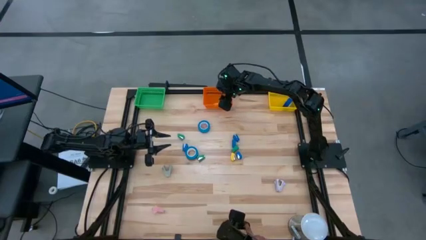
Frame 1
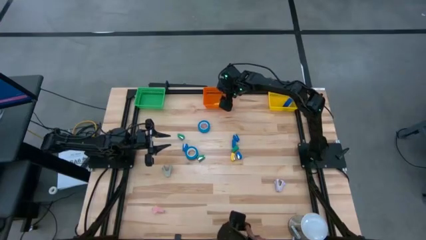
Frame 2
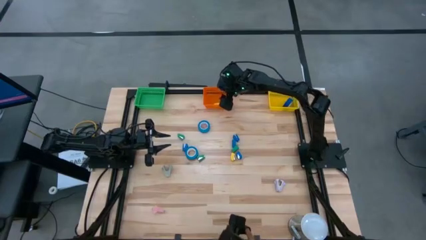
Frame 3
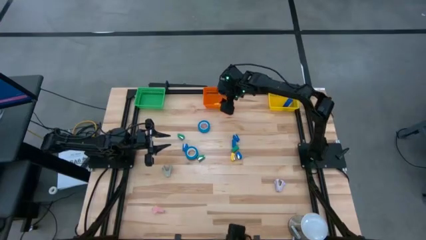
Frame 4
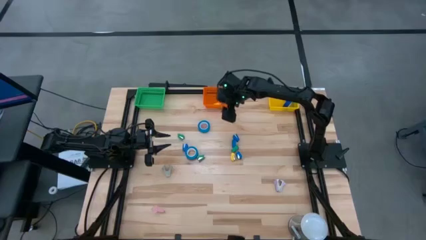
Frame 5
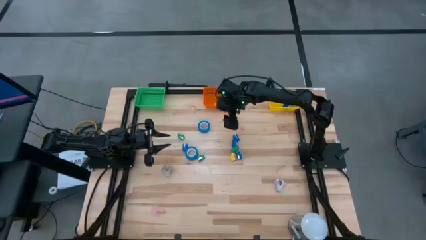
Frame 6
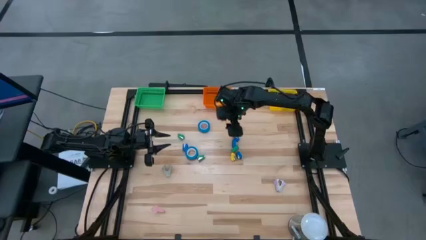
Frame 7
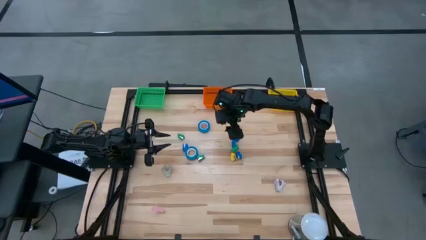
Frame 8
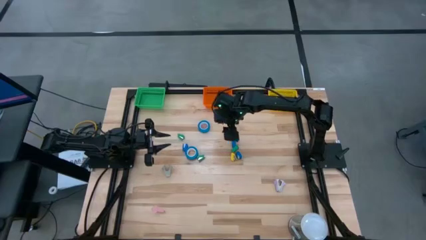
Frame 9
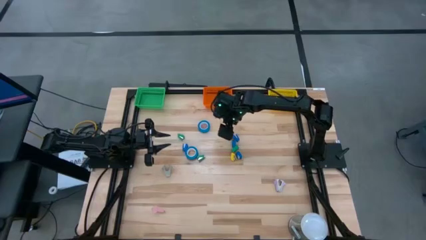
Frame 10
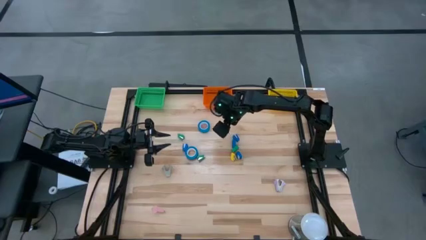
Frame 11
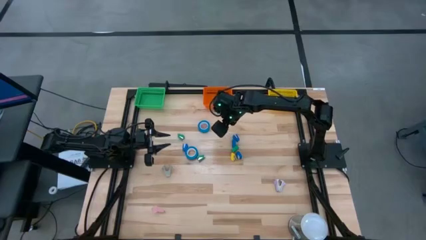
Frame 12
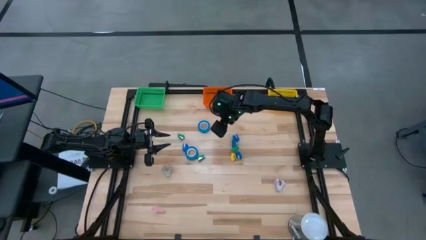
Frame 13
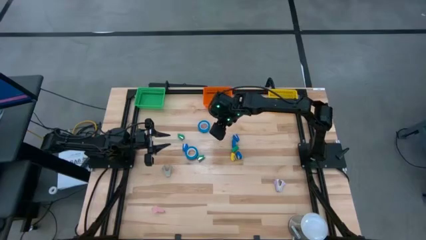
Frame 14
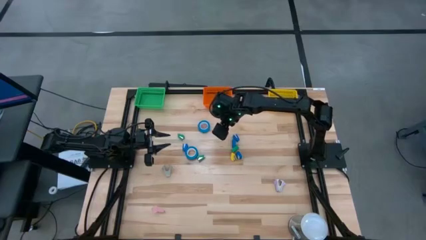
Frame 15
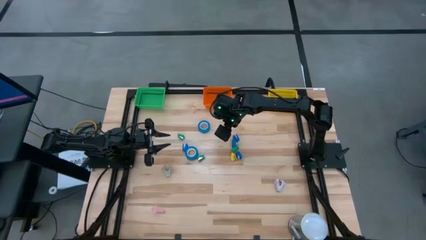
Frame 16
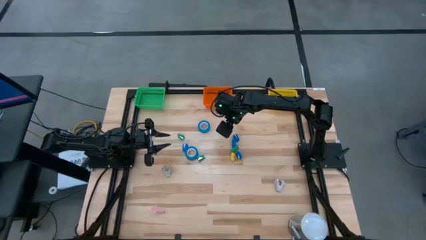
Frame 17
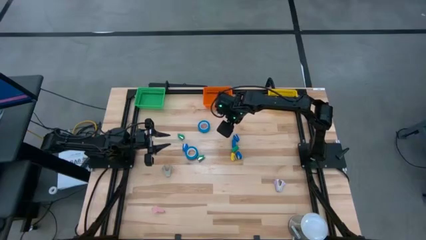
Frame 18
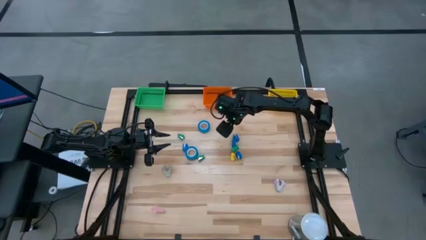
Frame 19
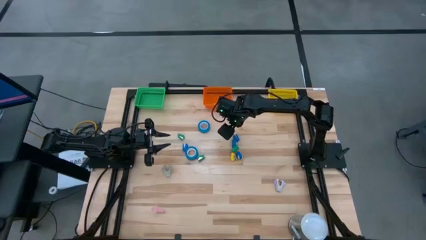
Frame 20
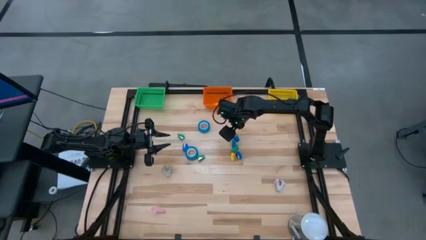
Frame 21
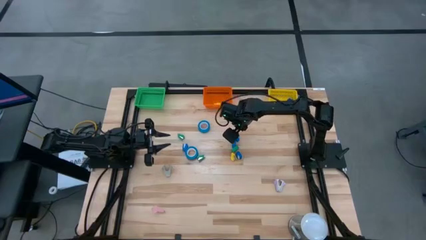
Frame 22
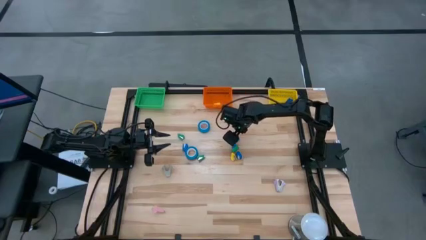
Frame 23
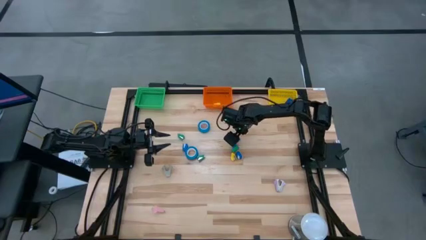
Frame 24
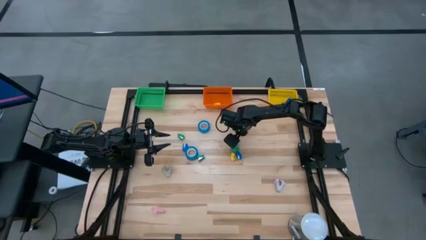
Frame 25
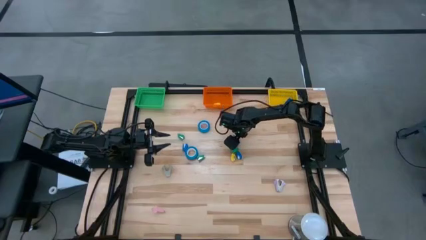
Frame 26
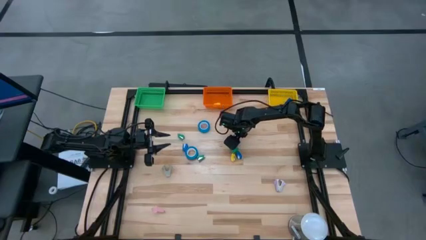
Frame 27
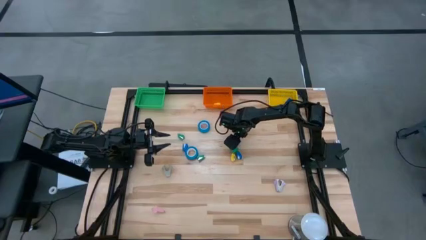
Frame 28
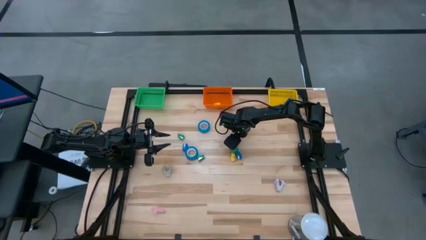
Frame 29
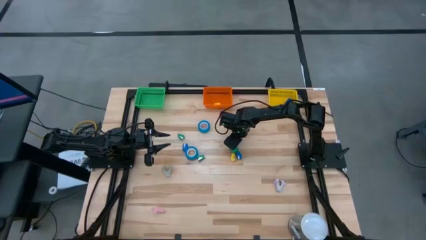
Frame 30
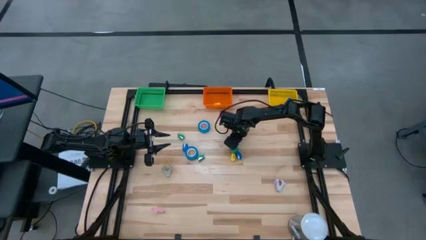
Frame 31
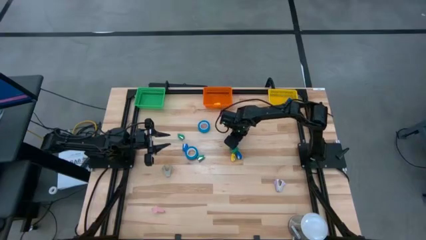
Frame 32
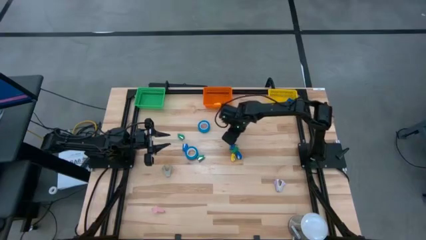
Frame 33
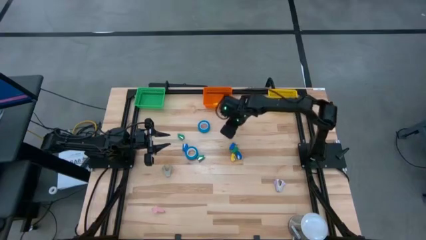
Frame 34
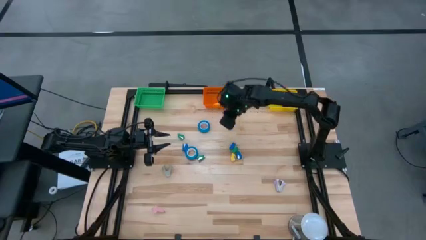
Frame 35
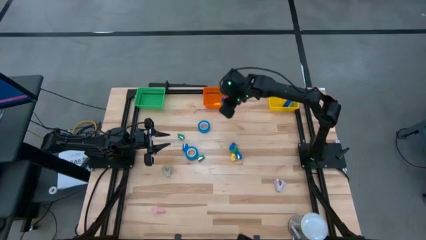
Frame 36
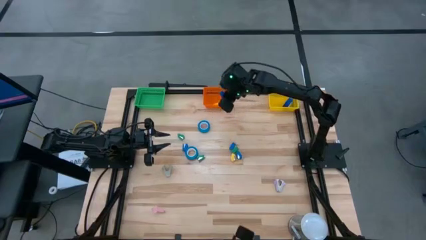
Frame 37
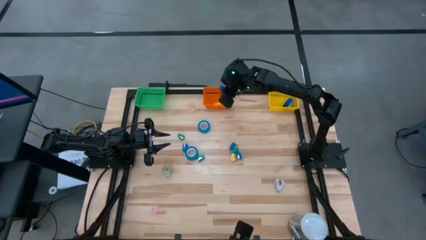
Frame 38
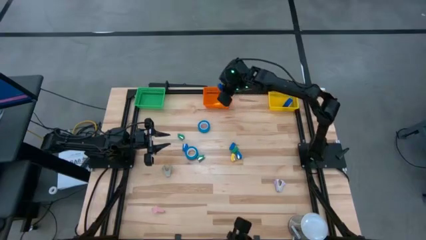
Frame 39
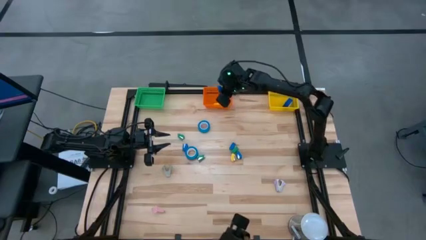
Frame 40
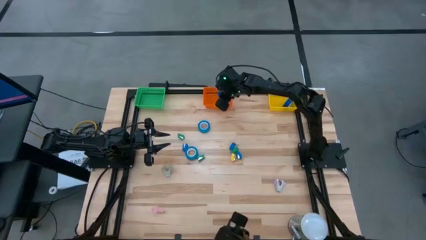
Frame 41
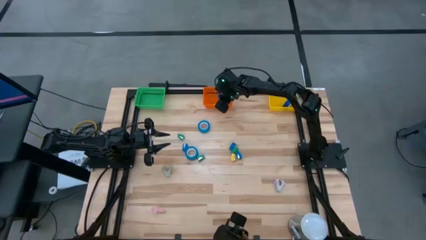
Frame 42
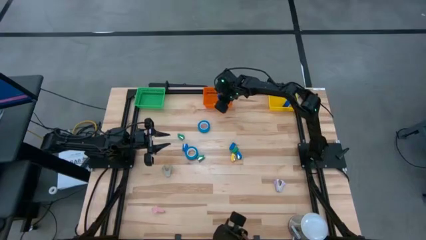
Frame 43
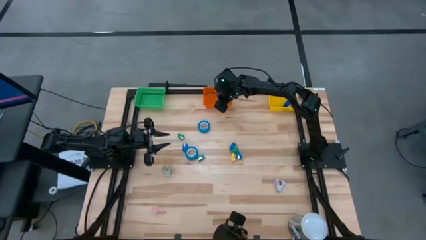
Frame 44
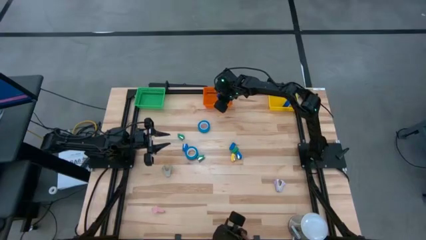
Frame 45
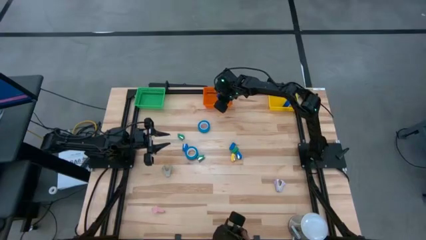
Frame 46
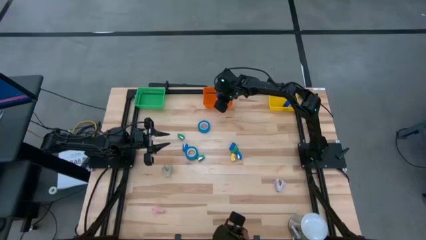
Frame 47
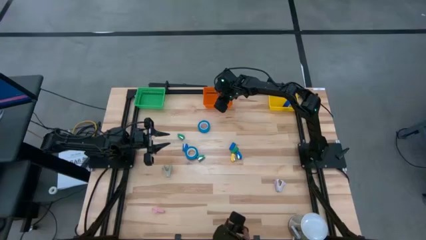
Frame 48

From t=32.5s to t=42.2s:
Task: Pick and place Stapler, Stapler remover, tape
Put the blue stapler into the orange bin

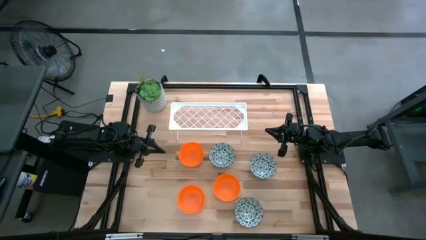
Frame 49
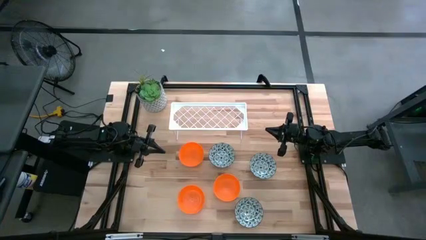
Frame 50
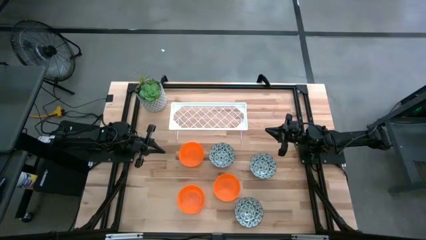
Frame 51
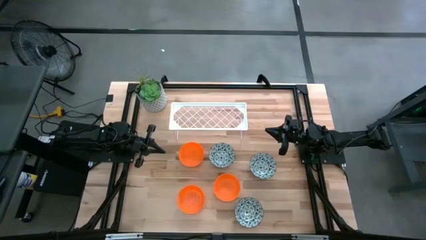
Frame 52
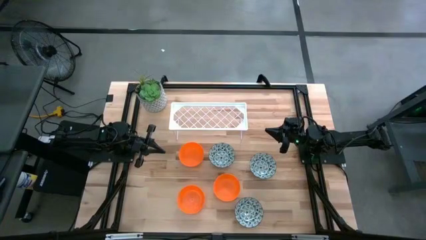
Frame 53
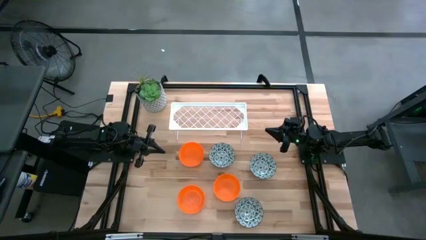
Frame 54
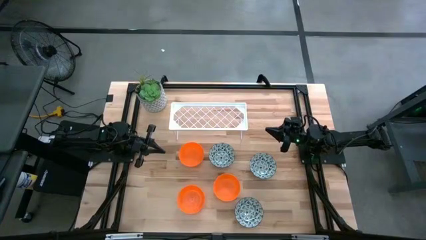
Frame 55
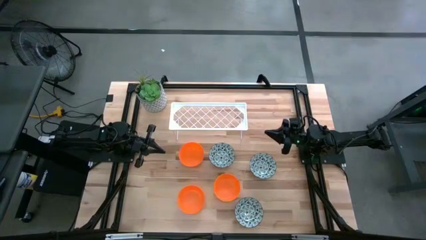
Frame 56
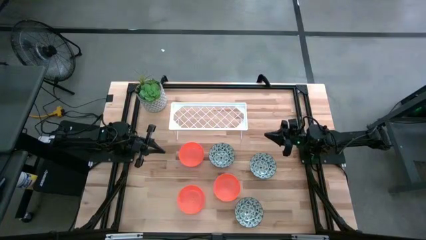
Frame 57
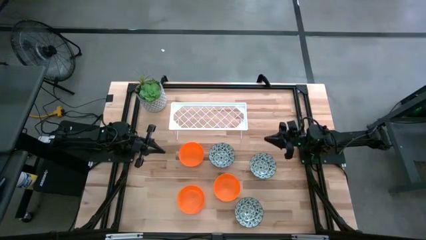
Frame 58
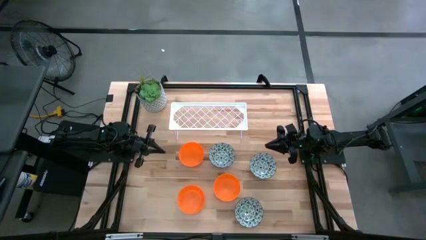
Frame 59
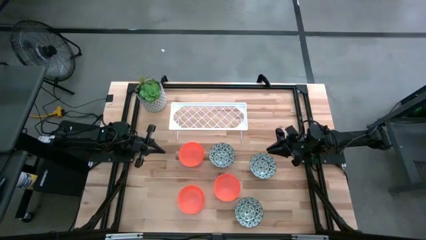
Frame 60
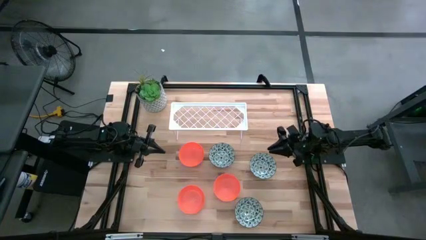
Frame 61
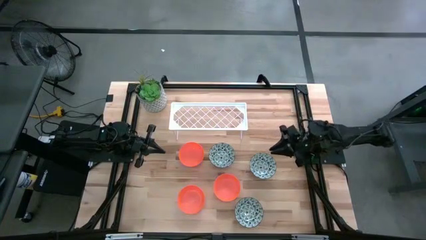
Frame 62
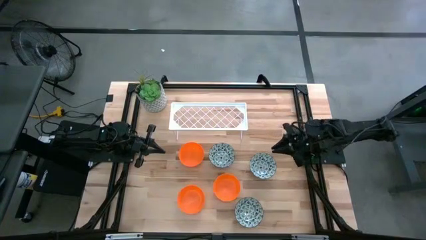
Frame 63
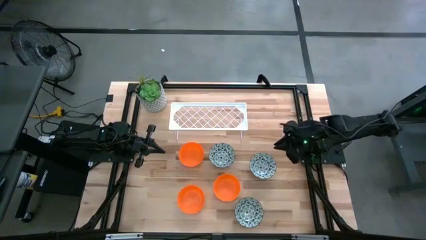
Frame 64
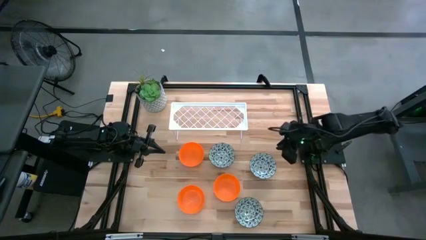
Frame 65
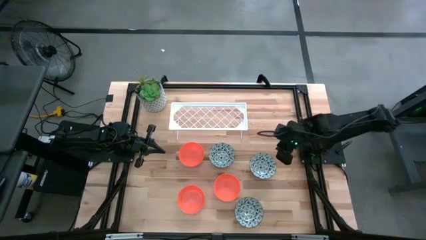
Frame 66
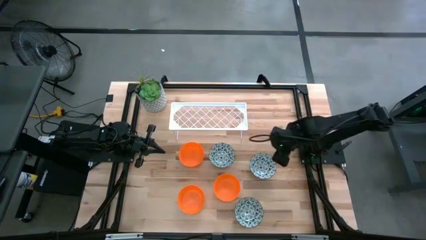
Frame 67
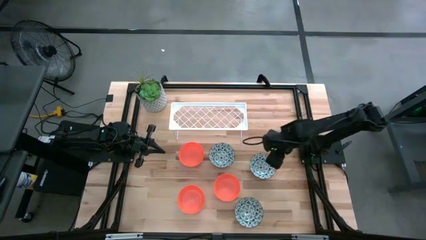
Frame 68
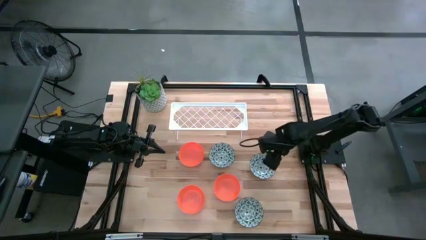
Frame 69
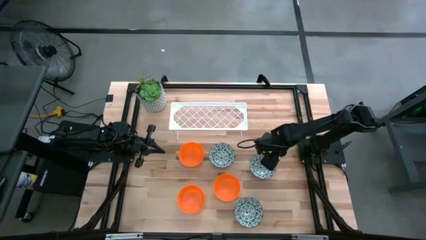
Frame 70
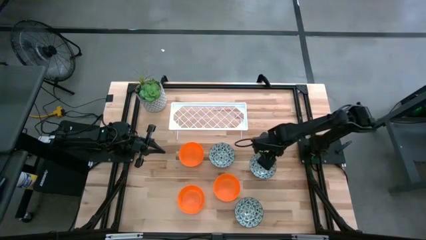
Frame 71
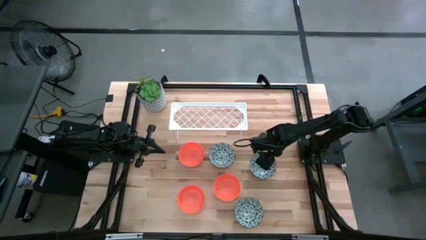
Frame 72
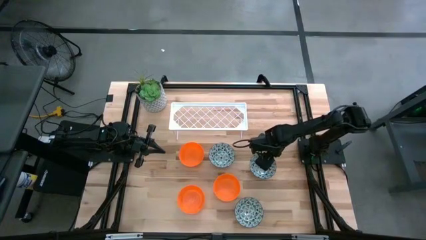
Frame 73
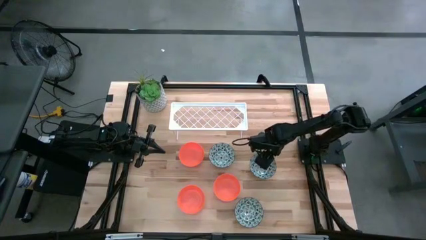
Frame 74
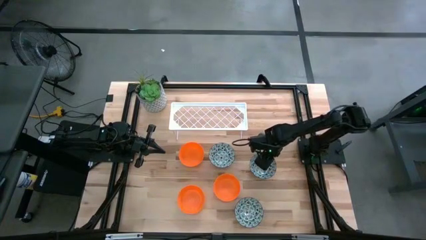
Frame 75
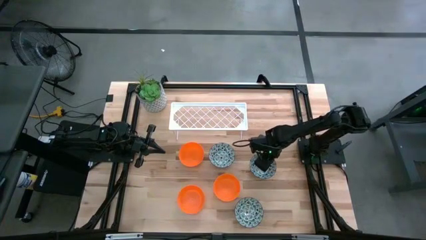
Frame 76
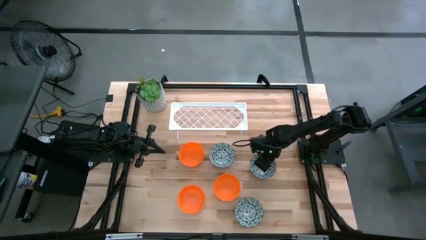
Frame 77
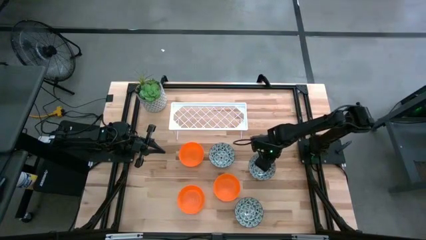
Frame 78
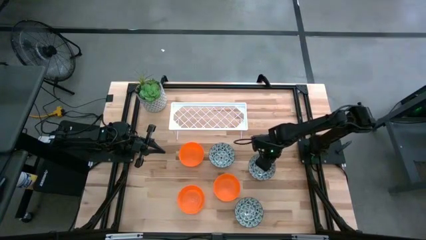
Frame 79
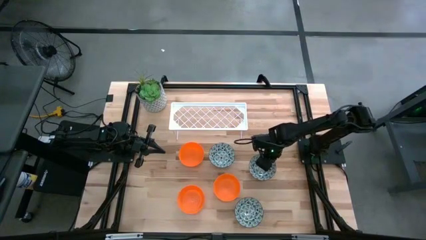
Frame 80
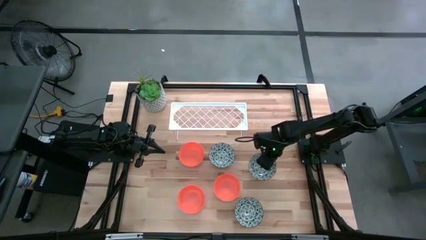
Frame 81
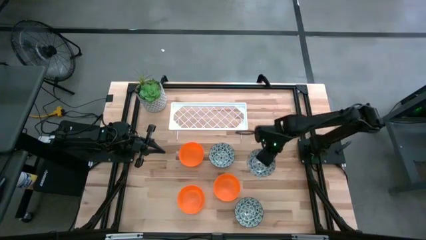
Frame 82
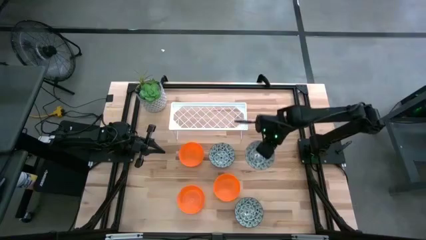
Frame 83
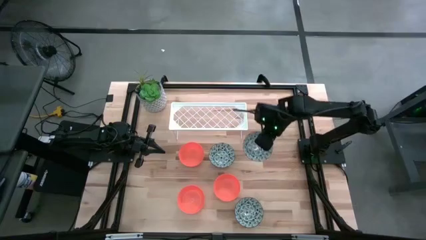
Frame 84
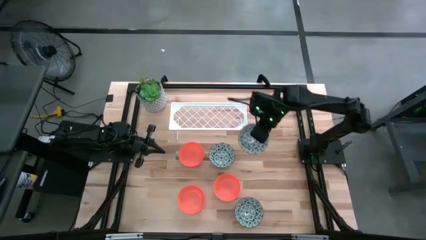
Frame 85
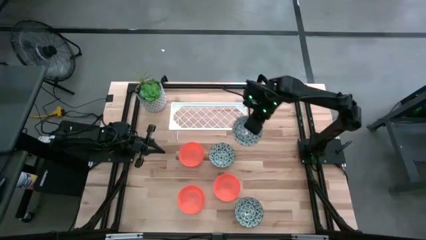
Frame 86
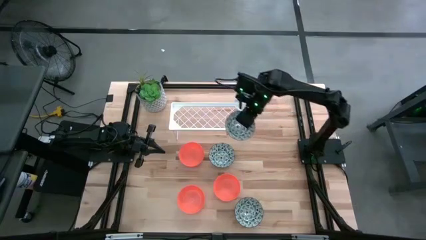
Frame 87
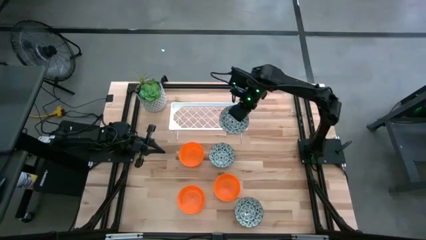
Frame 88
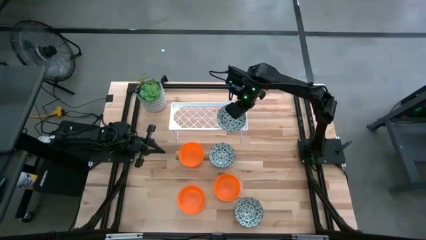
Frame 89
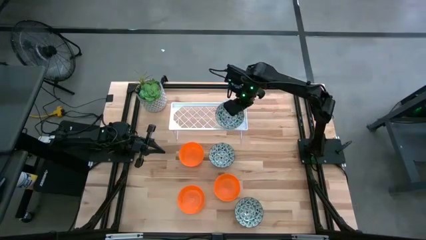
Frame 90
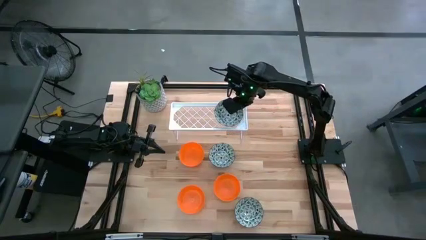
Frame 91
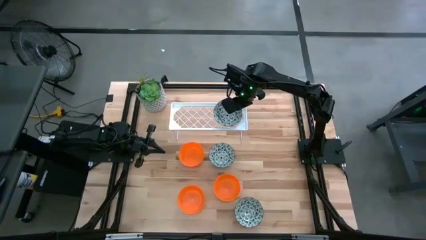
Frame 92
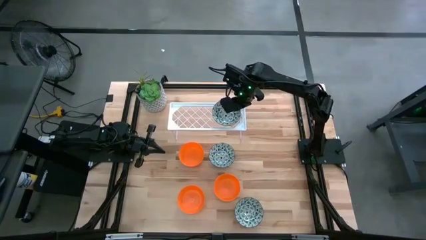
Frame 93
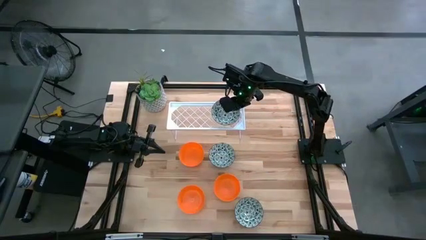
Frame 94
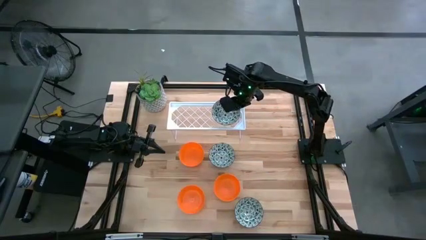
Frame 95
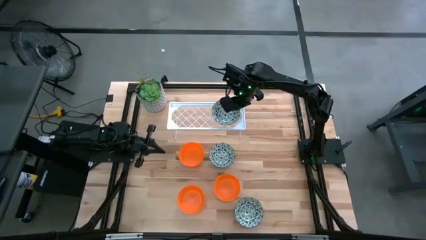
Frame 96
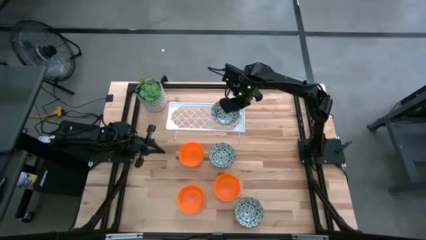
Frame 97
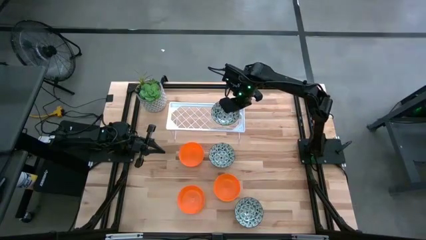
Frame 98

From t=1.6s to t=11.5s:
Task: Pick & Place Mini bowls
Put the top right white patterned bowl on the shelf
